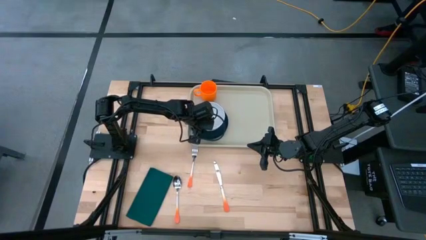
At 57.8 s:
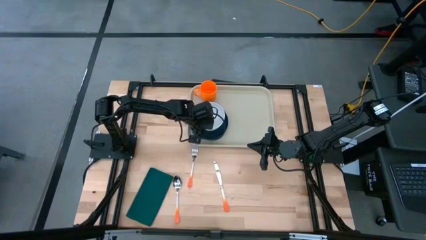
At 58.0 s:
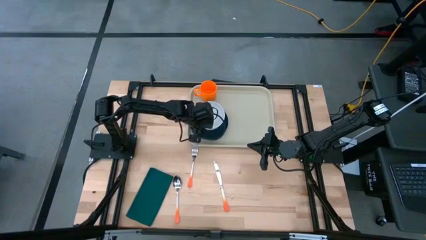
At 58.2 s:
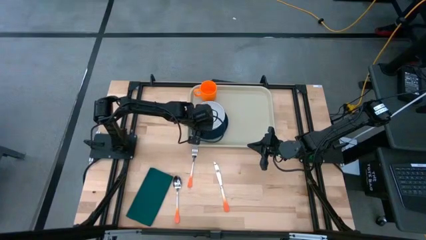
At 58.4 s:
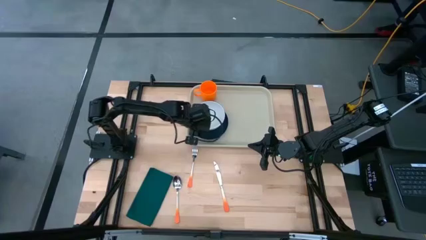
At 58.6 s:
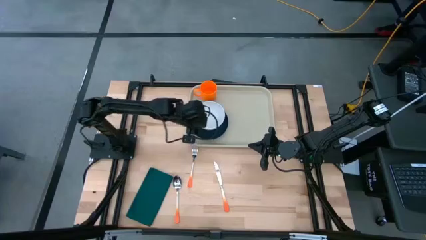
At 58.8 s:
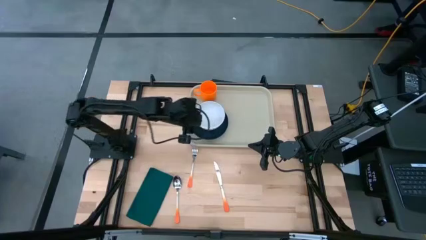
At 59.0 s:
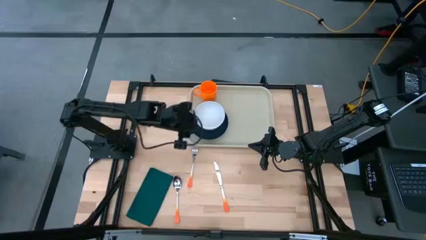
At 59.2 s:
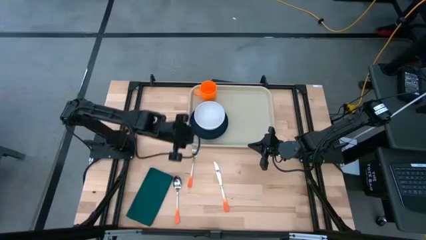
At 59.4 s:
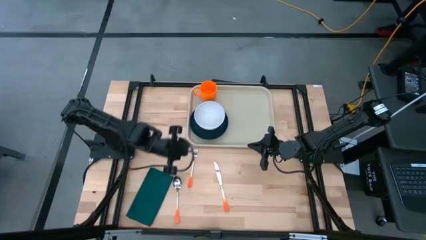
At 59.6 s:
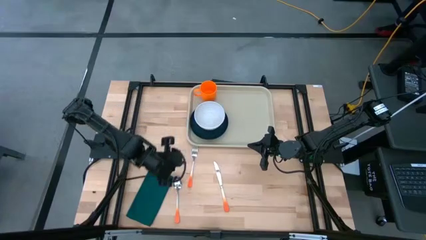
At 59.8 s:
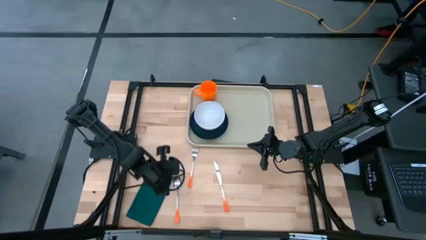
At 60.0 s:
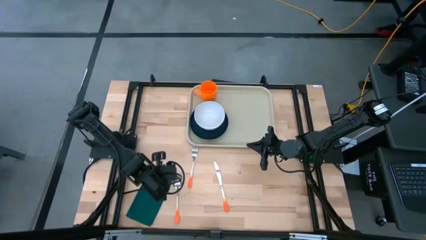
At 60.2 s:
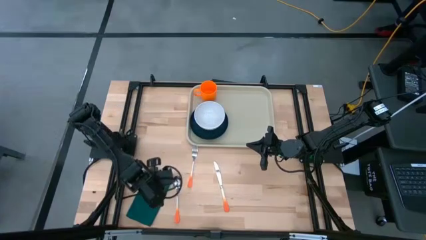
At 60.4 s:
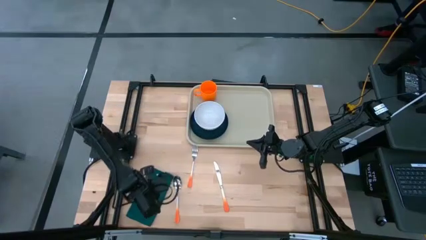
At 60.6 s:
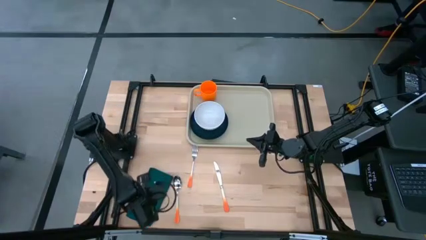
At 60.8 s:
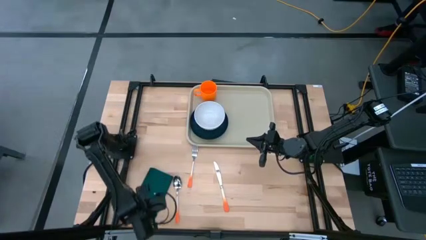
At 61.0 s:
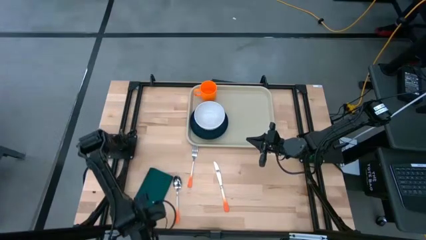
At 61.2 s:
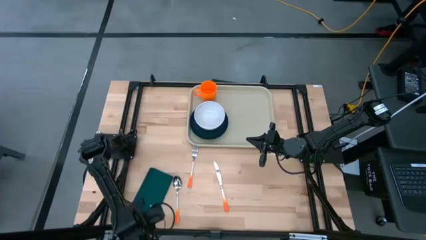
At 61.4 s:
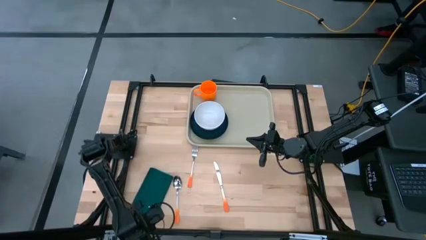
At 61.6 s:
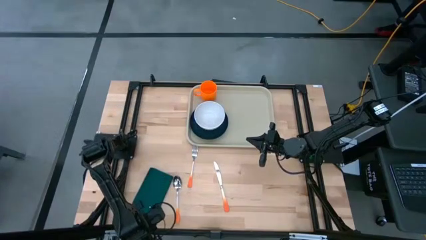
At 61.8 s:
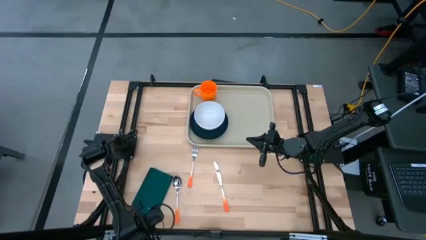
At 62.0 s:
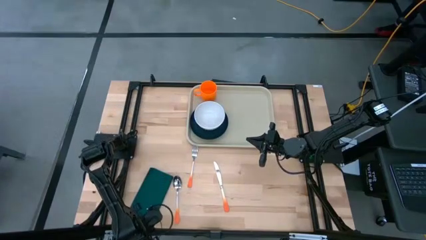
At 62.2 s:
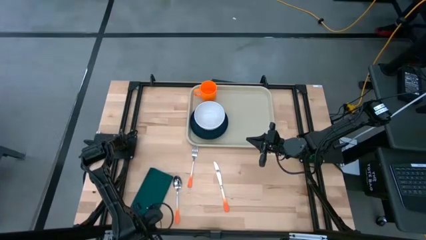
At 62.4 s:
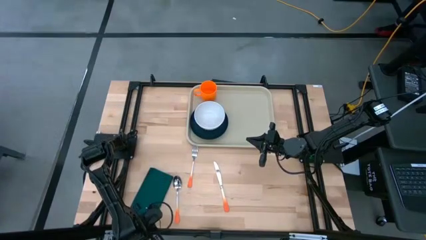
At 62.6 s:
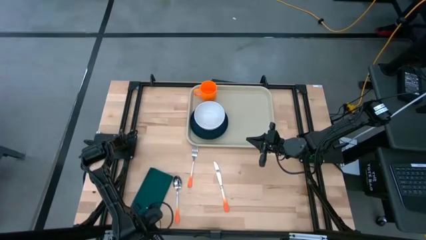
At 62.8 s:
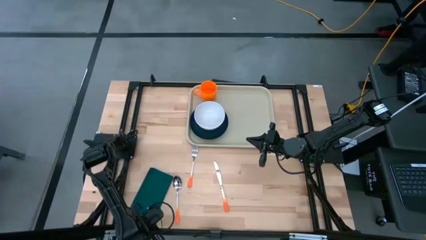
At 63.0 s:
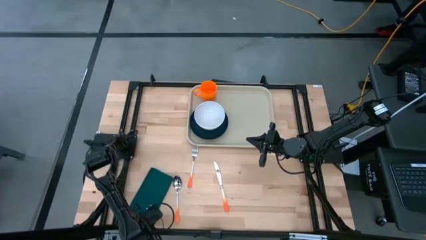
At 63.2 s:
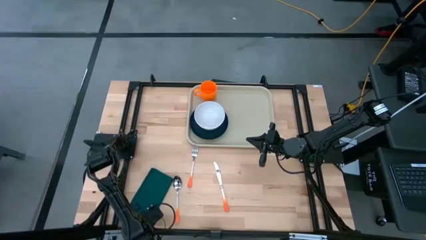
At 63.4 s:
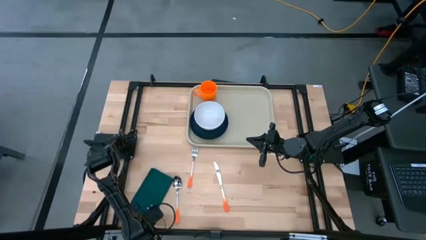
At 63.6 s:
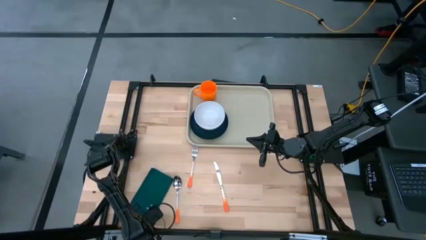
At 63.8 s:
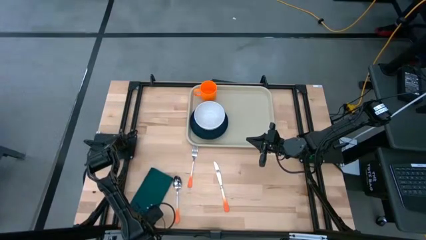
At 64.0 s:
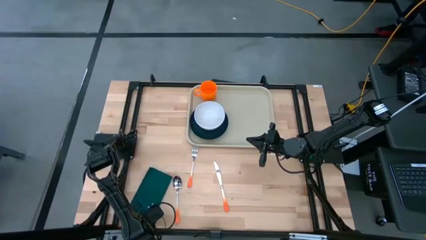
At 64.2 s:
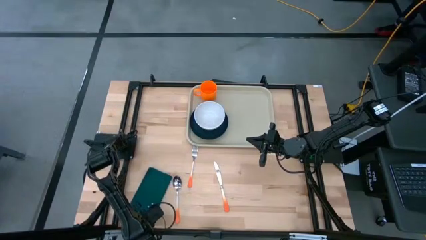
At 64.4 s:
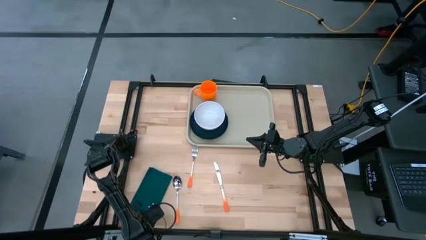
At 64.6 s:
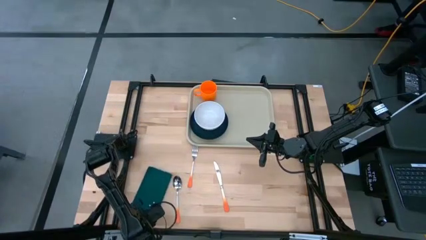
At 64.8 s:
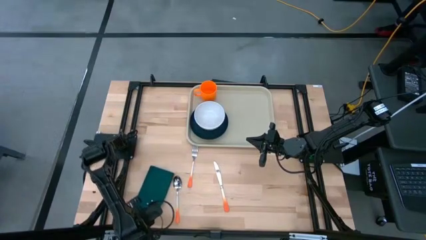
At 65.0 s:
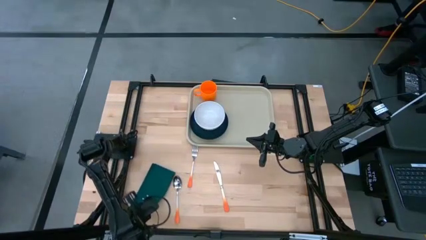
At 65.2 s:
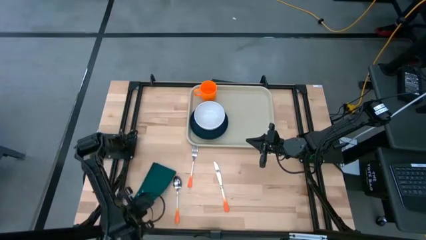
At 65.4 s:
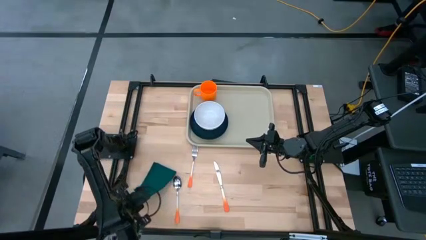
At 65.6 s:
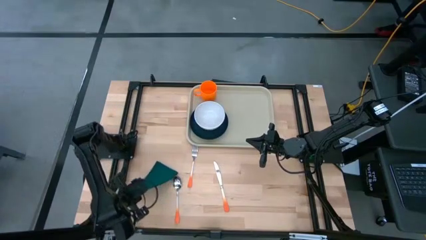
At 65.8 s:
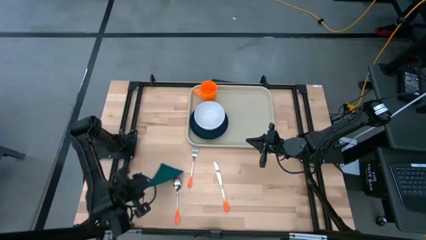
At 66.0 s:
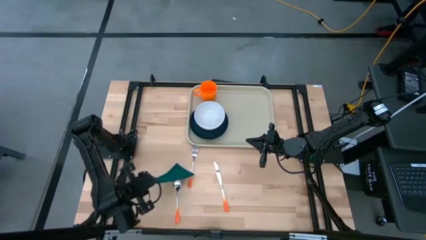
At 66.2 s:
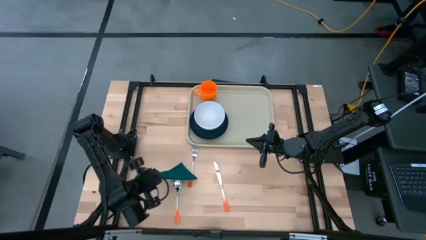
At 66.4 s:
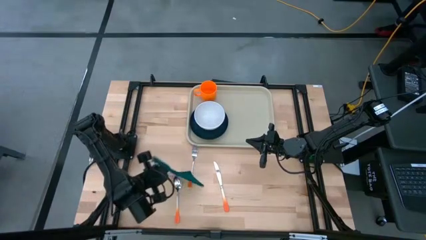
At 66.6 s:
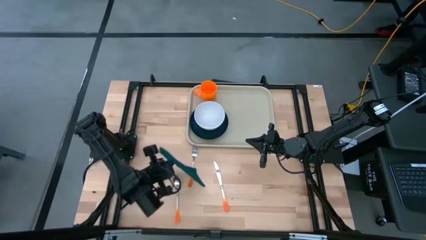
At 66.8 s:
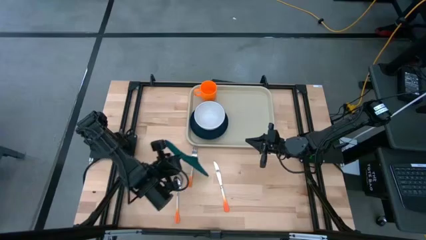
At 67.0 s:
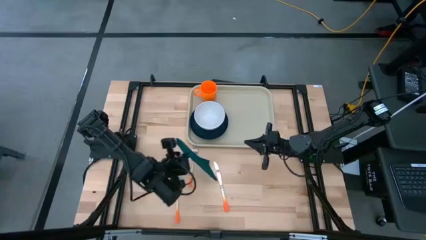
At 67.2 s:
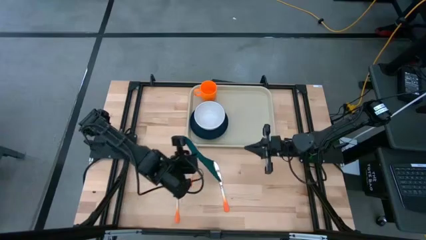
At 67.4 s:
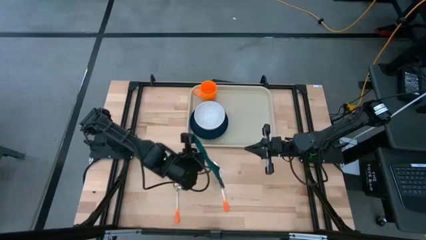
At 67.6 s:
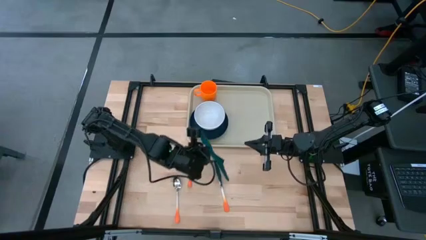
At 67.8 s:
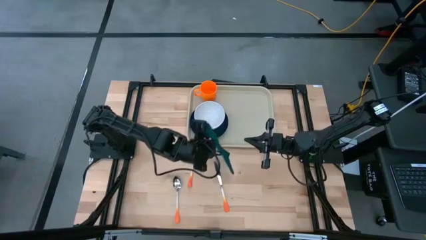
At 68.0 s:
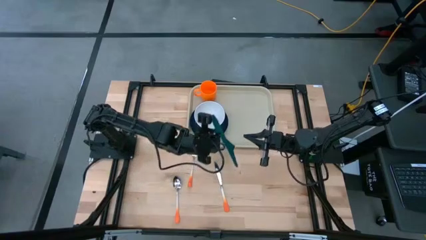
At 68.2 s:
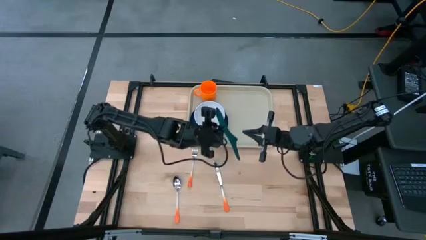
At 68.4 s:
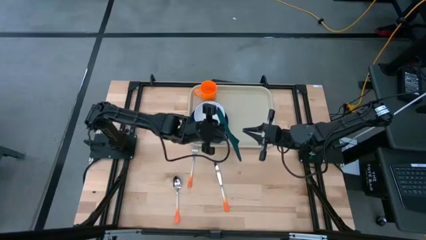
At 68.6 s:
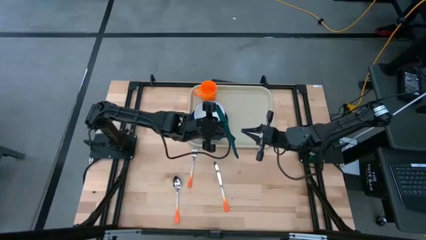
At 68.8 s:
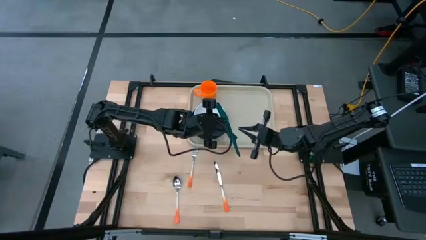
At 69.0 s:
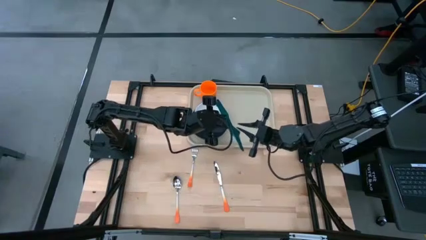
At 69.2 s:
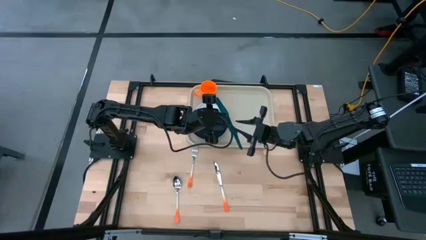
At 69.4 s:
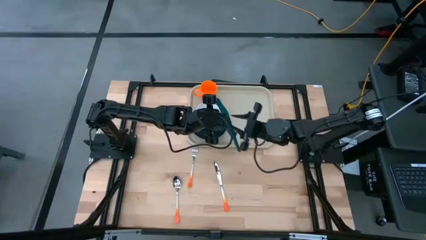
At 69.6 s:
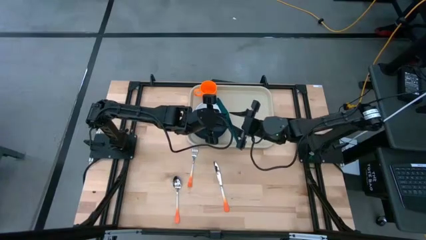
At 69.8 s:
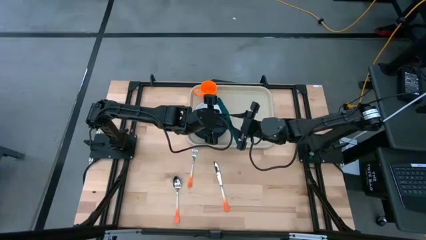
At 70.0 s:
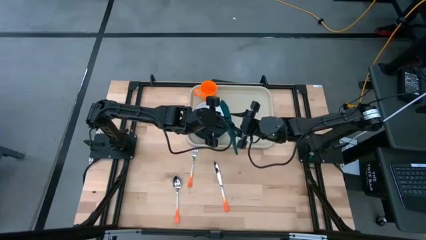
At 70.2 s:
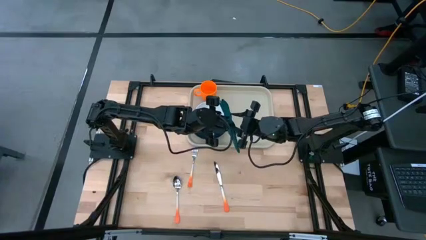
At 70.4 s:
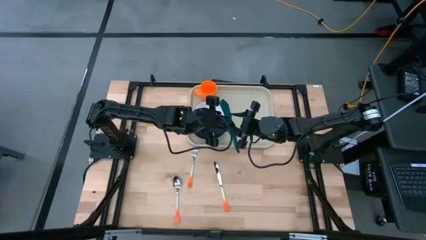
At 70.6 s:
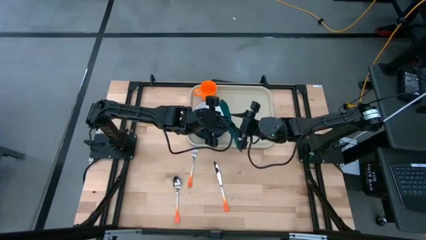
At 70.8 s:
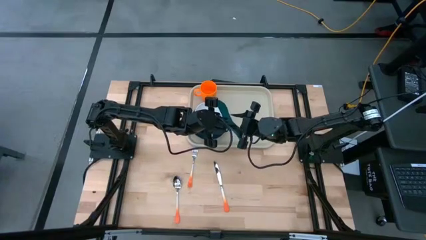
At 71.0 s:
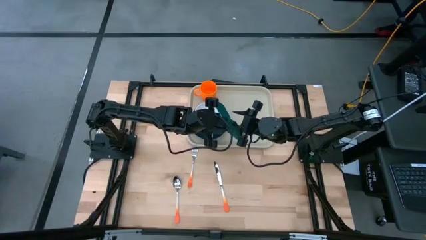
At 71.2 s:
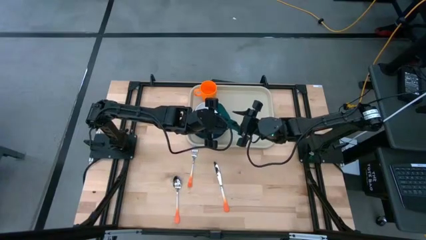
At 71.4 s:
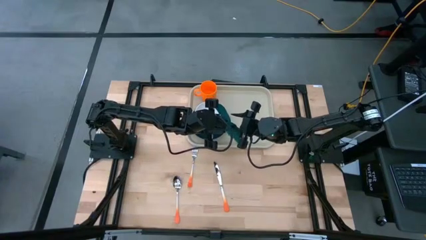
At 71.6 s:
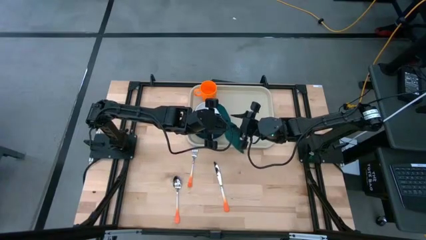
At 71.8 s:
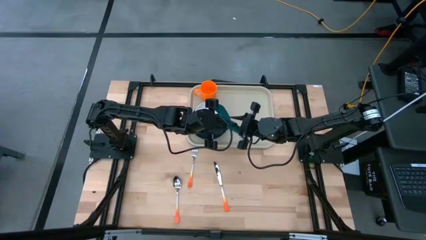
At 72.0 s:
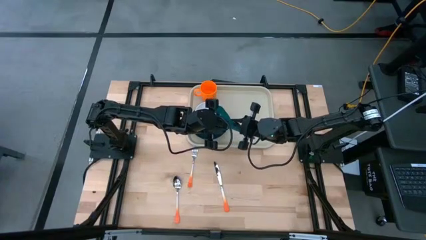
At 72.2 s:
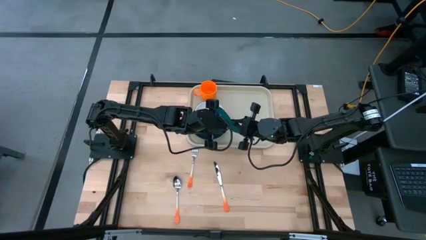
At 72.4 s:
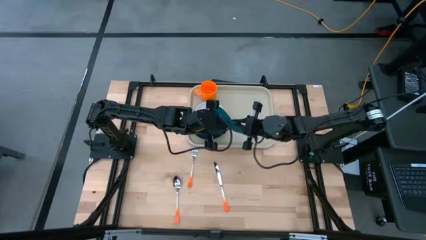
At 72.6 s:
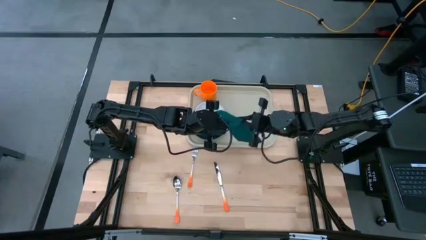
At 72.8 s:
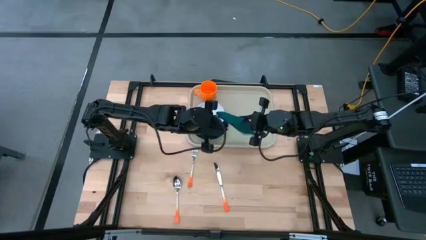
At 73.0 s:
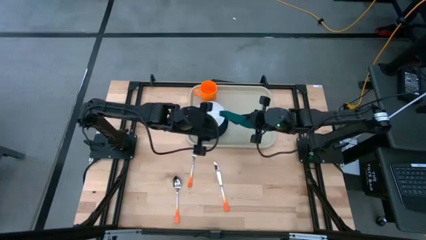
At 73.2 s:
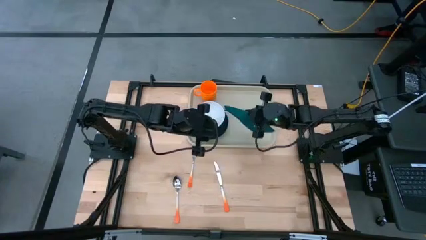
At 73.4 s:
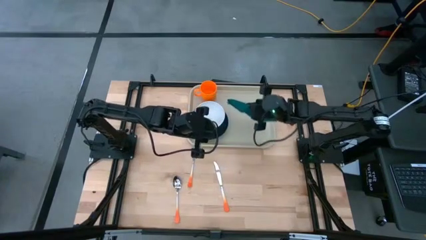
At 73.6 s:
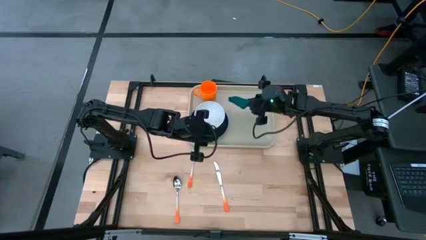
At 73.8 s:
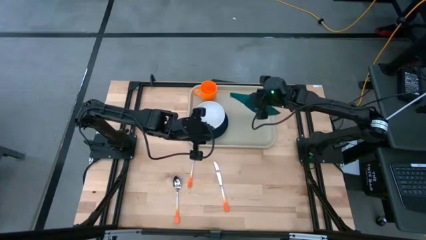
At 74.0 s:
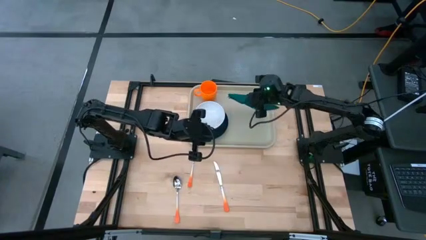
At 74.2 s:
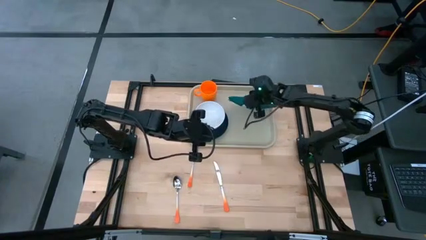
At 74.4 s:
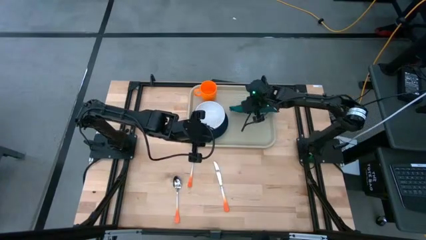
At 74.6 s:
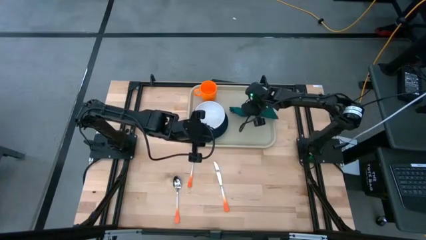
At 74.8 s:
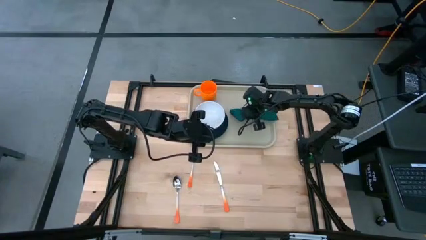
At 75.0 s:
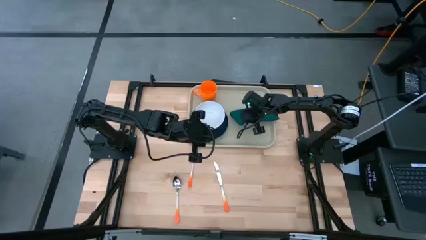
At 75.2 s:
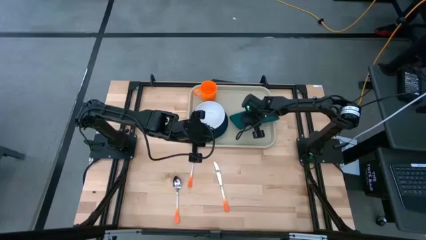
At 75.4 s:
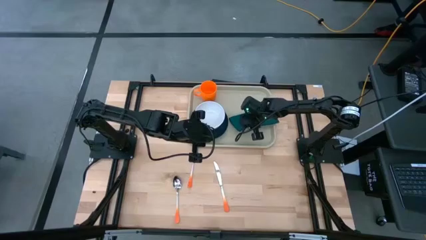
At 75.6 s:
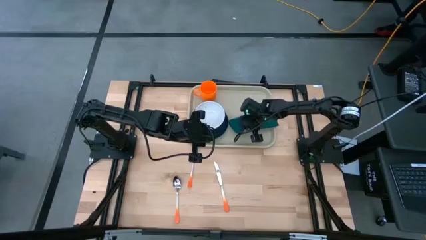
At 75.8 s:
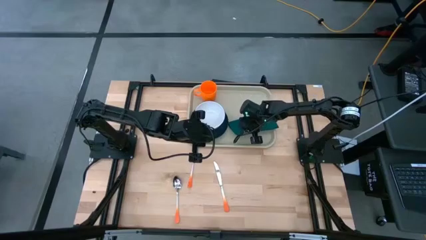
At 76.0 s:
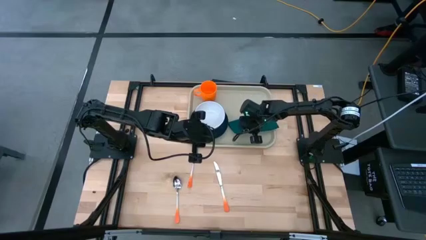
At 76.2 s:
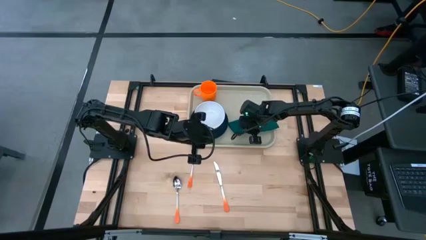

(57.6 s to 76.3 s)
Task: Set up tray
Put the green napkin to the right of the green plate on the gray serving tray
